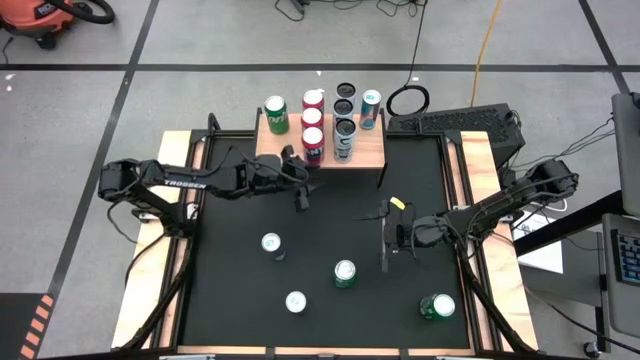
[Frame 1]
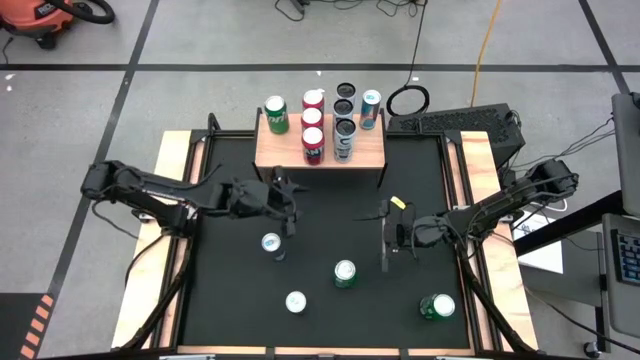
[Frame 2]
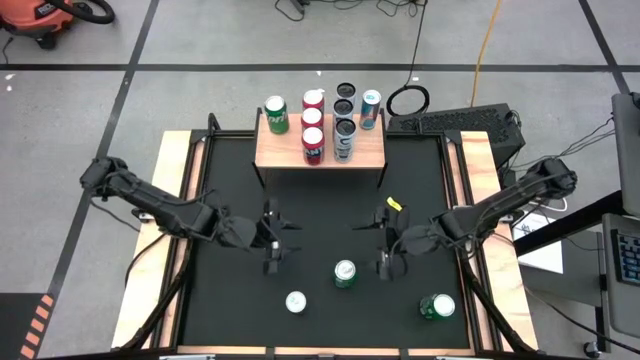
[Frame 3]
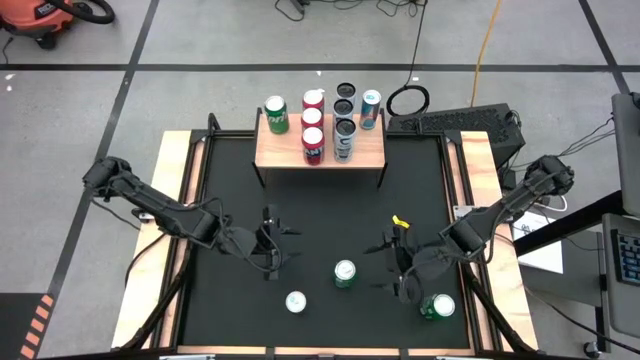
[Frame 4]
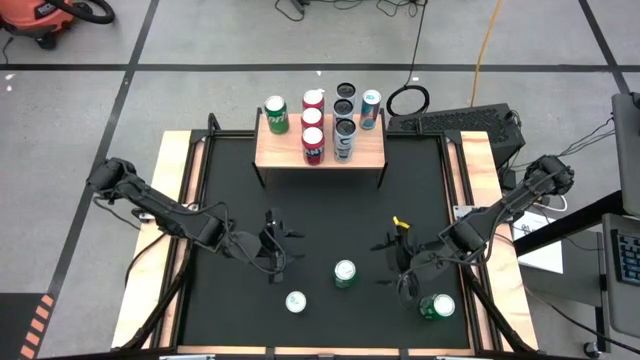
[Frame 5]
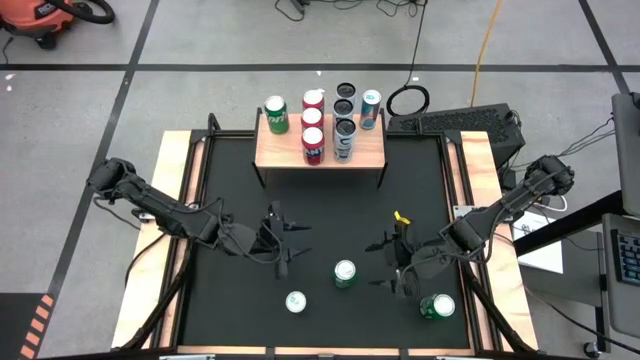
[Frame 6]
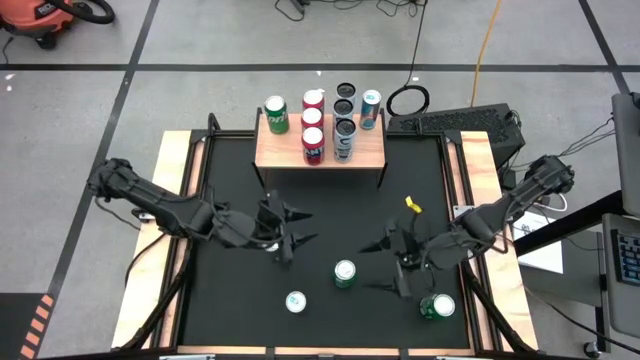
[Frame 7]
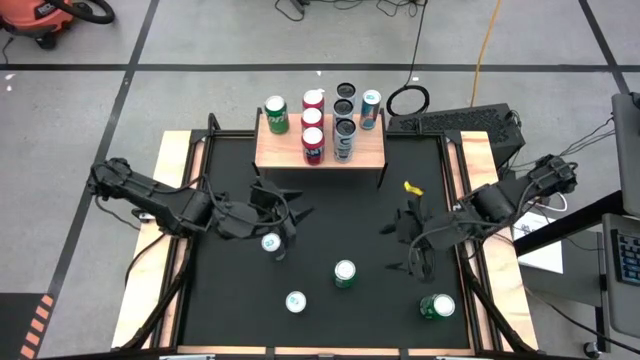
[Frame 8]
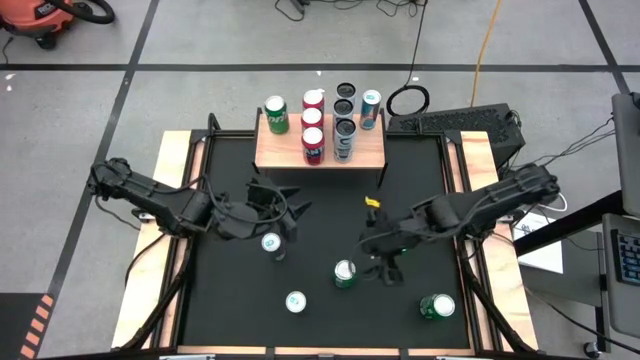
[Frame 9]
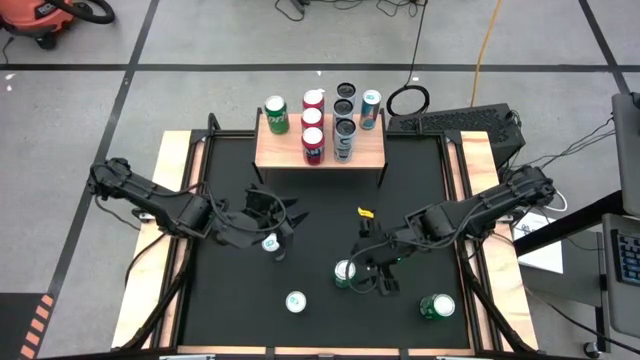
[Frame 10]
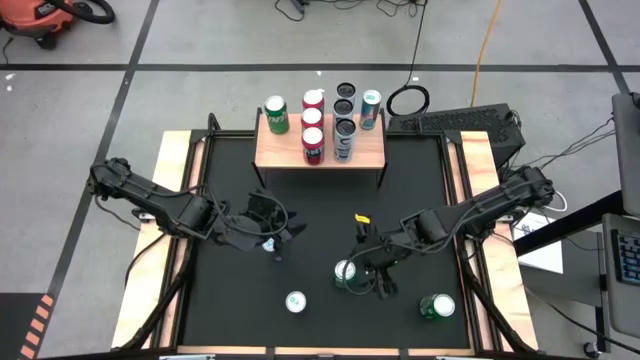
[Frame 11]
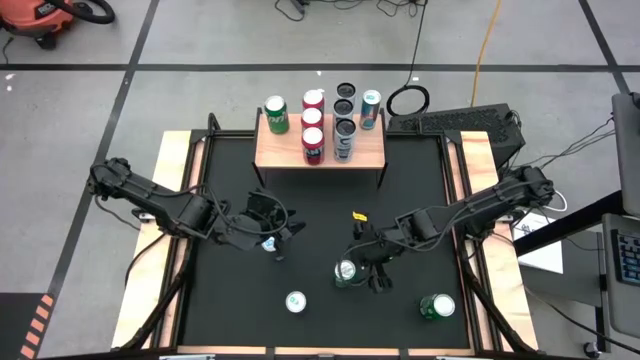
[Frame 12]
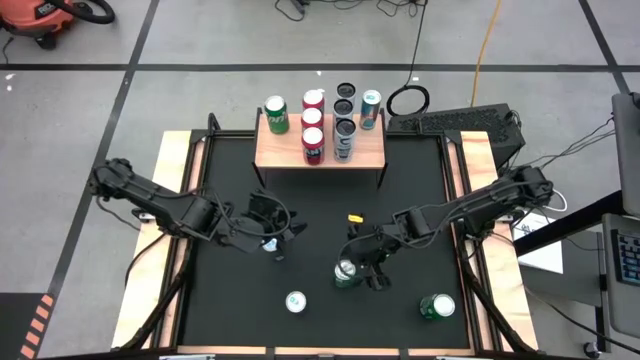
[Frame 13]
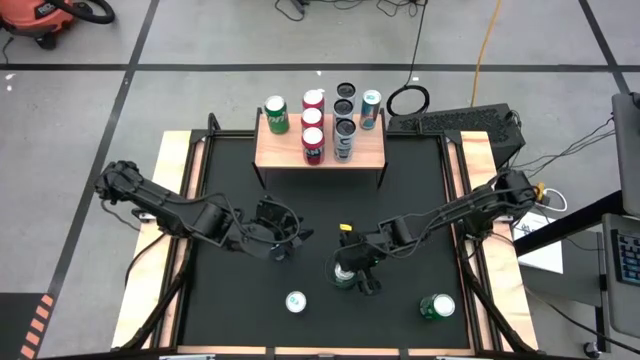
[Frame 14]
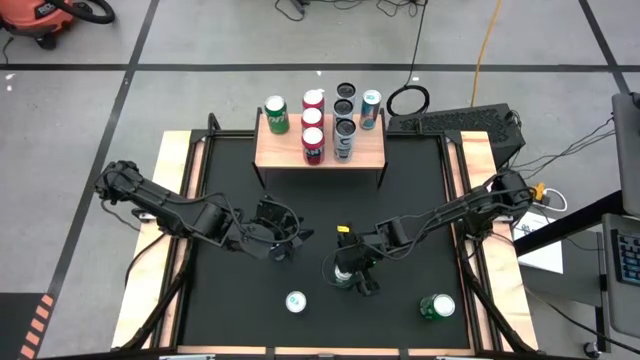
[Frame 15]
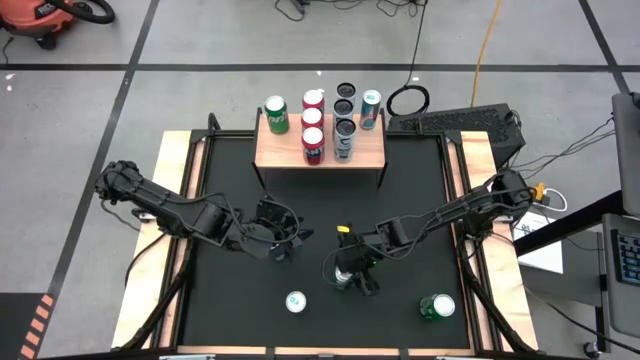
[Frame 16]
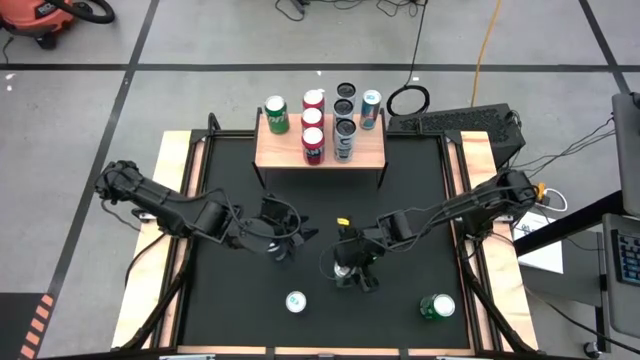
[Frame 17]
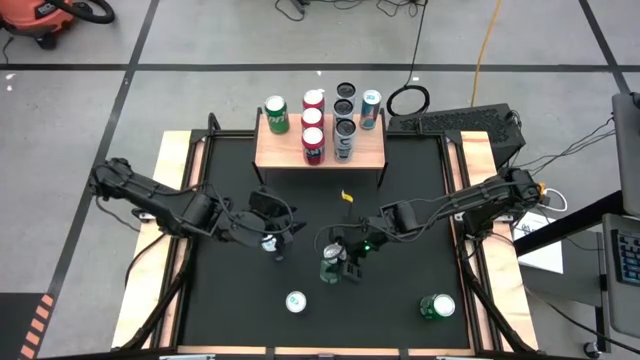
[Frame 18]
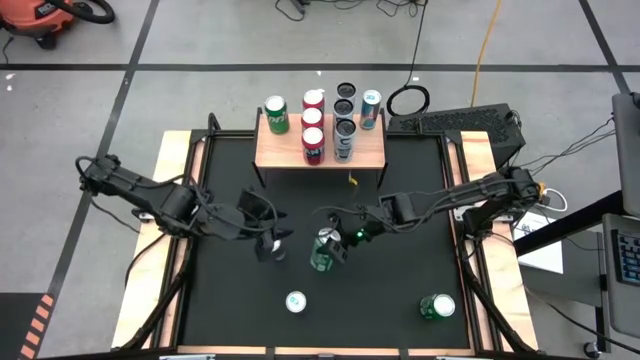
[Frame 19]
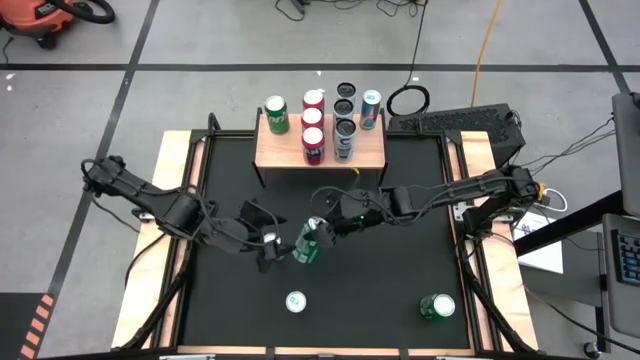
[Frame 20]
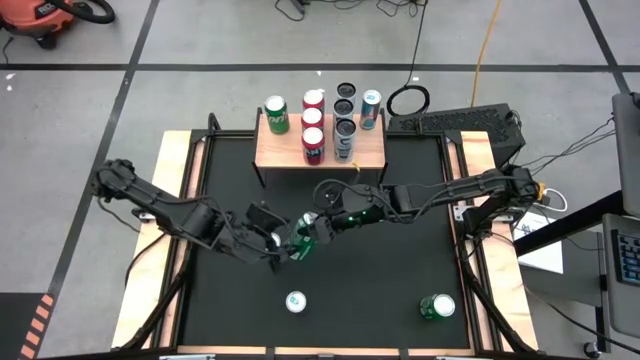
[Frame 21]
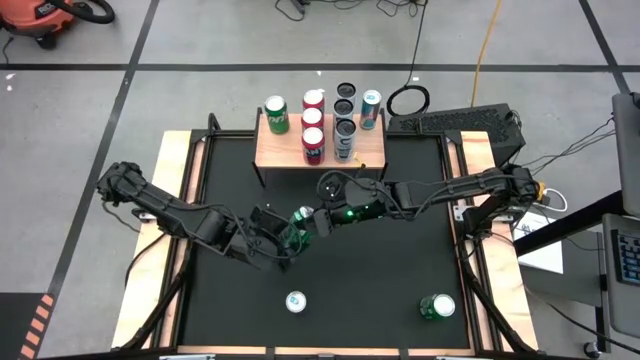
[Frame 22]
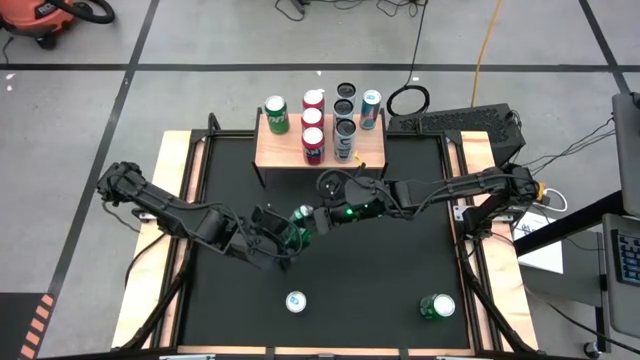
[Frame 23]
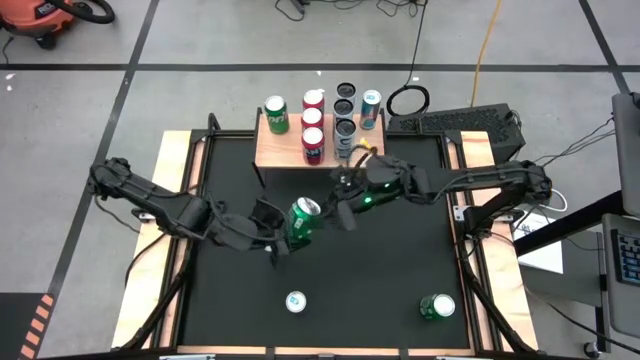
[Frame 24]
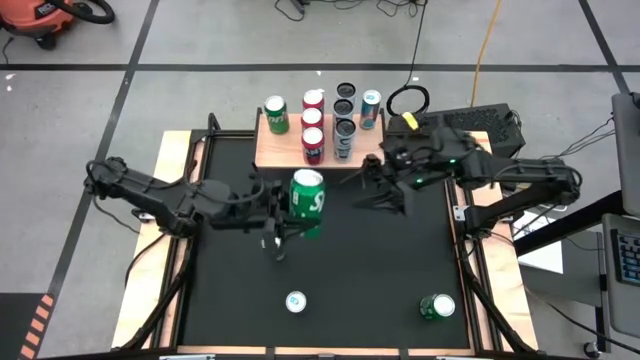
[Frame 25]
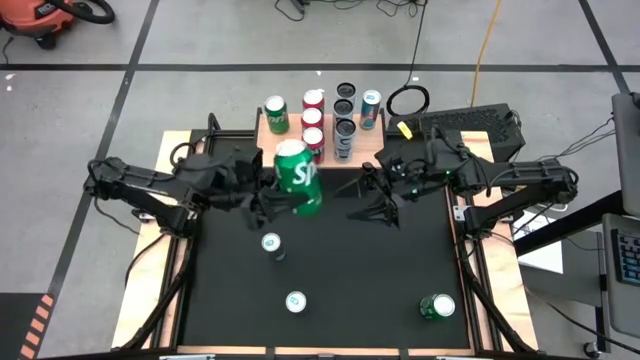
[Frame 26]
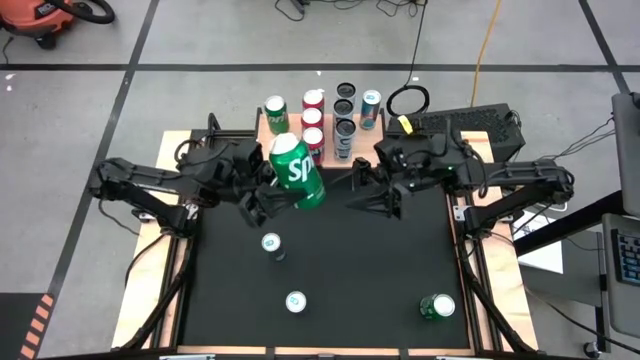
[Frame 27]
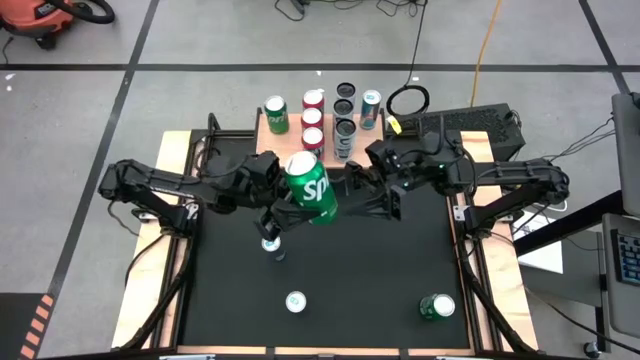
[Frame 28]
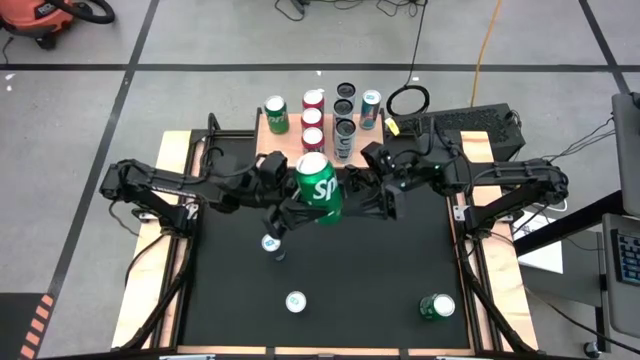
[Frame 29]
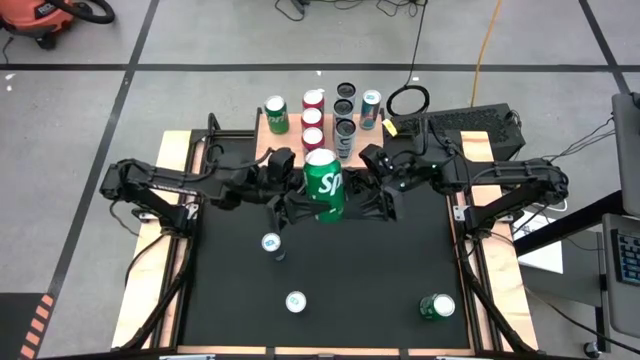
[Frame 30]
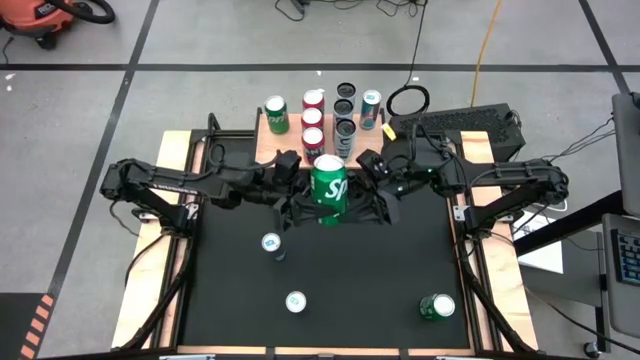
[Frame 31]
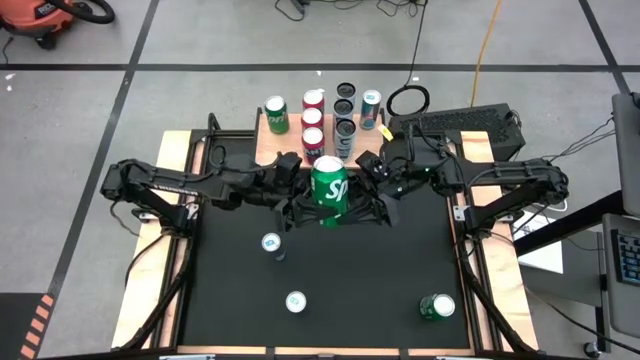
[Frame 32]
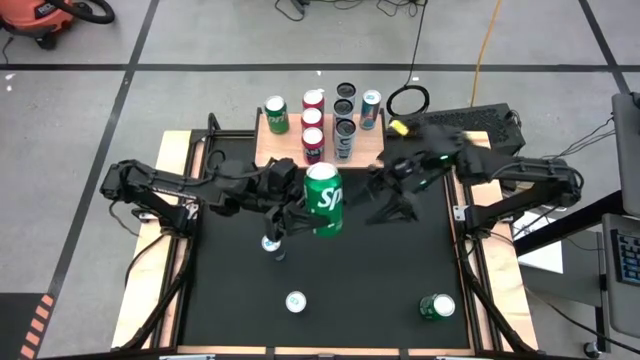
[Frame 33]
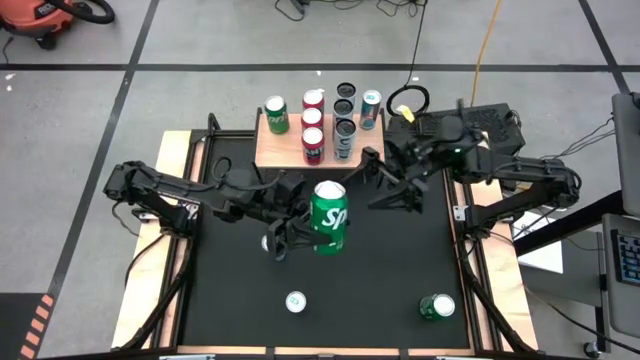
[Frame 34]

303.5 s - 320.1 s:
Task: Place canned beverage on shelf
Put the left green soda can on the shelf aligned with the other green soda can

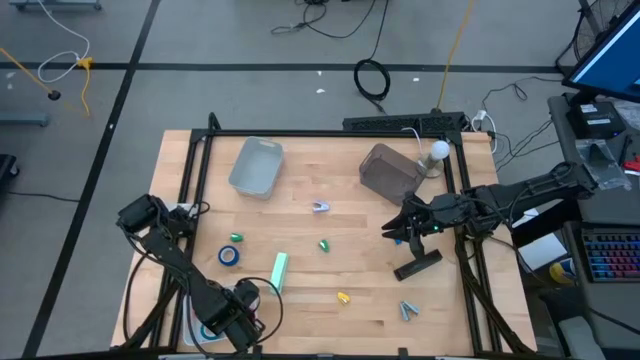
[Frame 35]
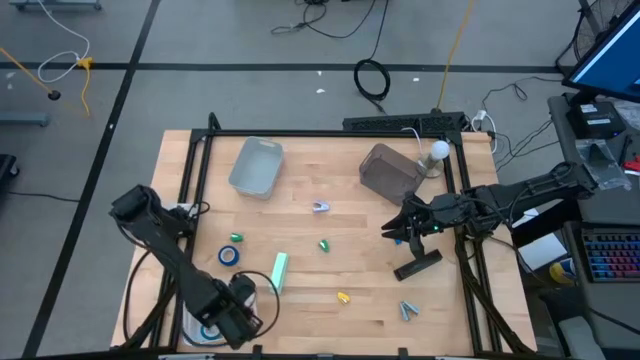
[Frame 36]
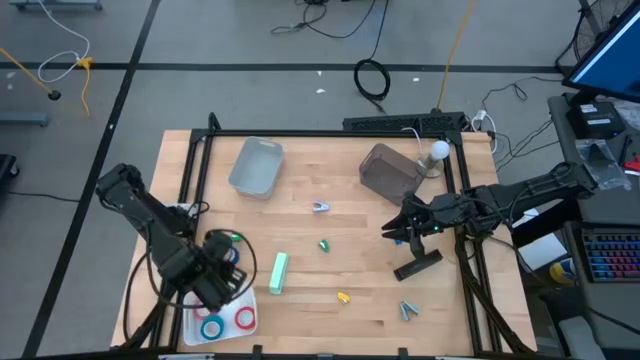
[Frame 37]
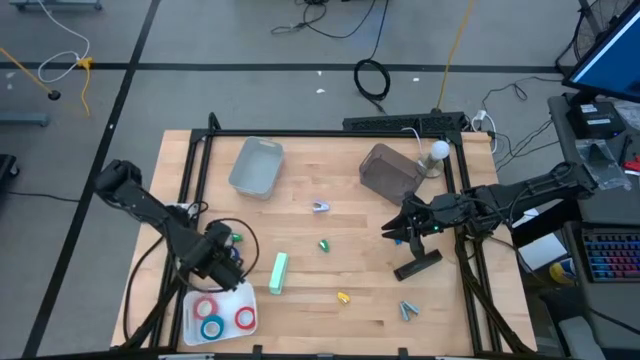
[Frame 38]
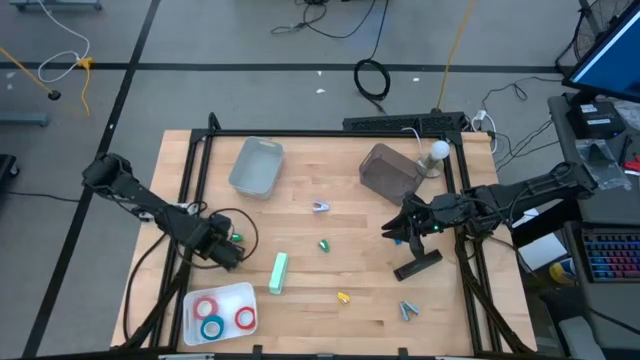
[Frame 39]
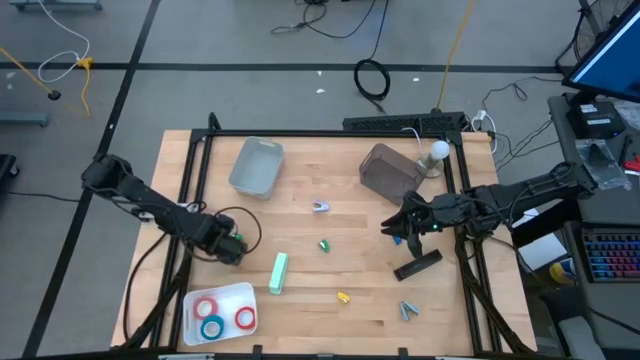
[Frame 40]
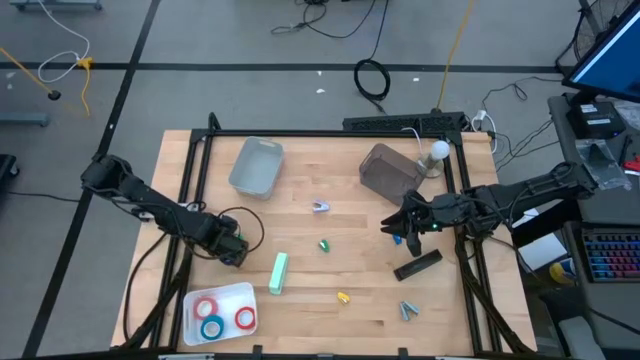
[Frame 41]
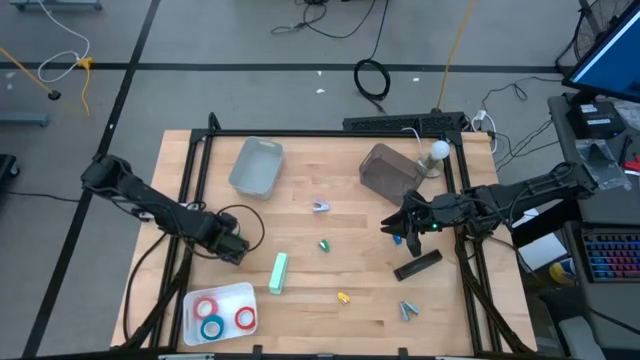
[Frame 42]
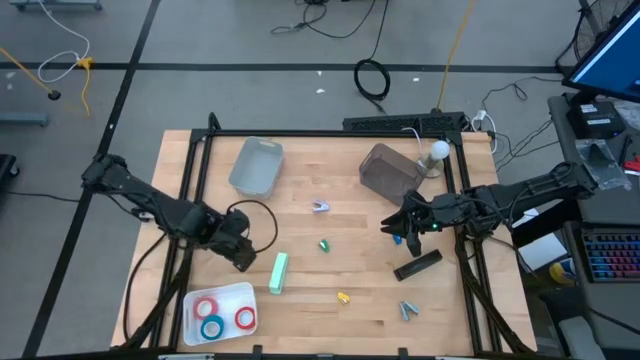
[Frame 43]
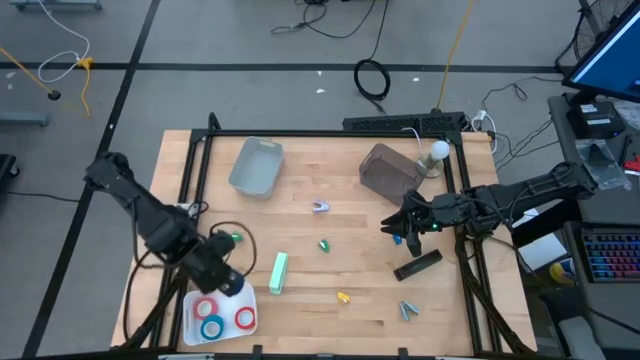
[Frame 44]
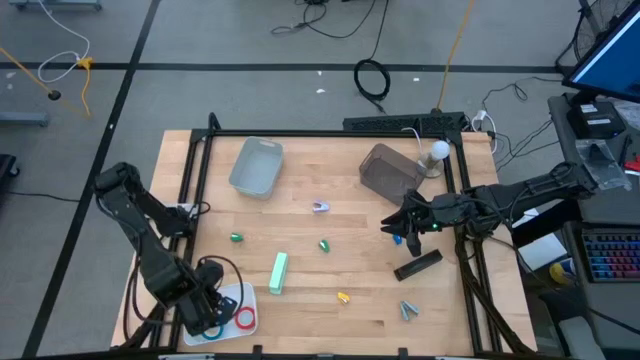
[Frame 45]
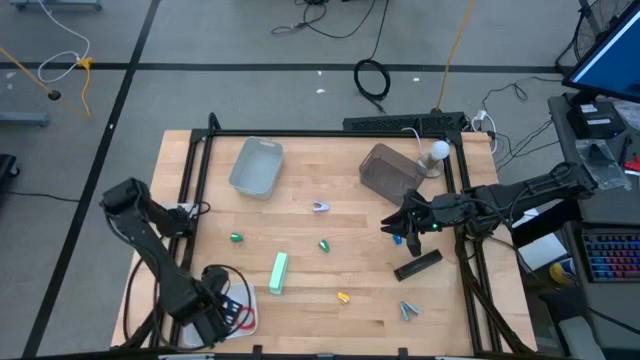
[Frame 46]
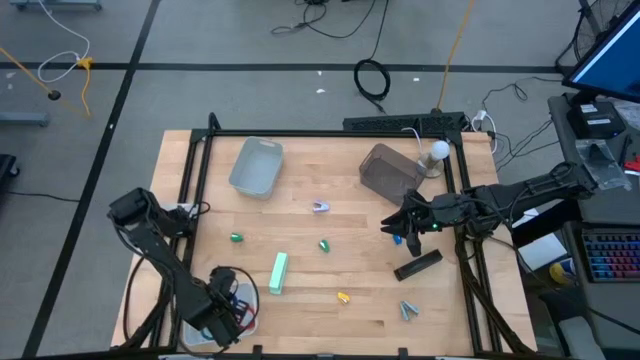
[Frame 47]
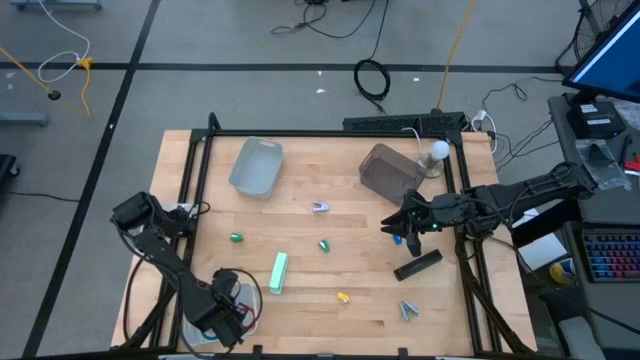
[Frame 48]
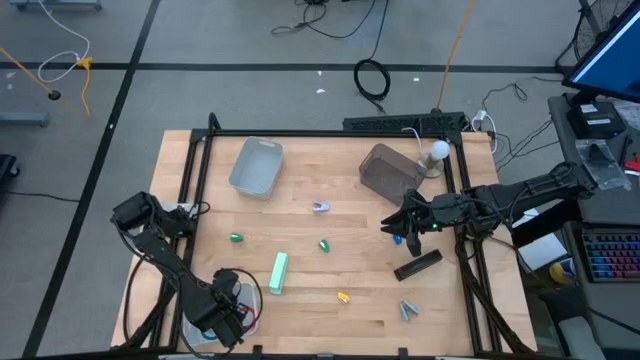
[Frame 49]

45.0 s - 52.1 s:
Task: Pick and place Stapler, Stapler remover, tape
Put the blue tape into the white bin
